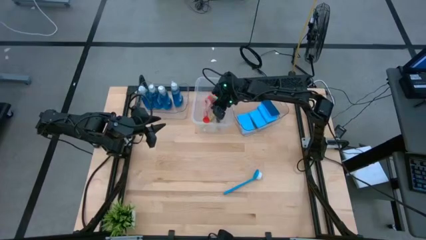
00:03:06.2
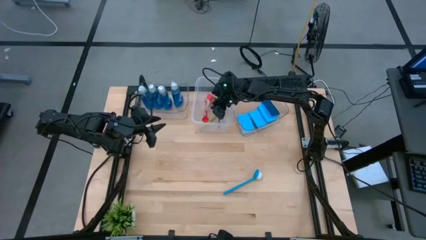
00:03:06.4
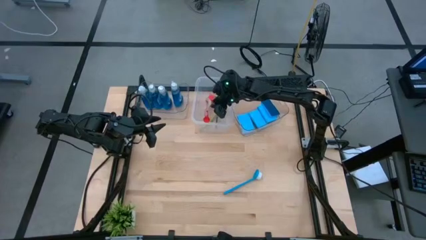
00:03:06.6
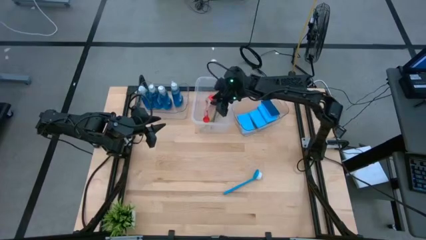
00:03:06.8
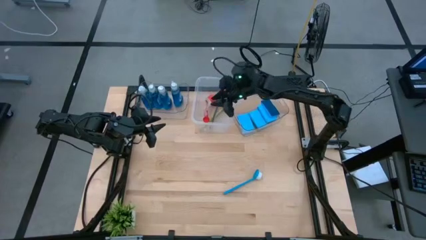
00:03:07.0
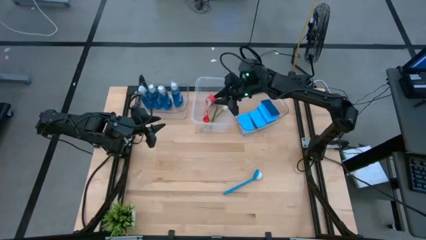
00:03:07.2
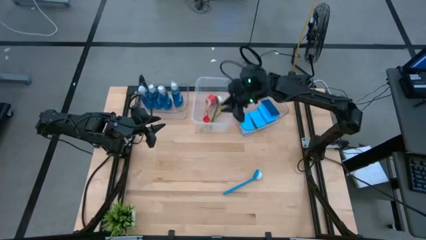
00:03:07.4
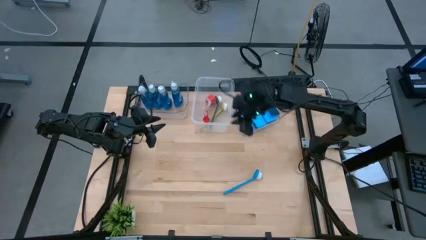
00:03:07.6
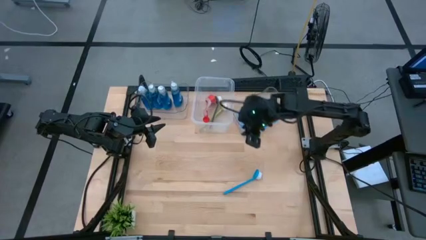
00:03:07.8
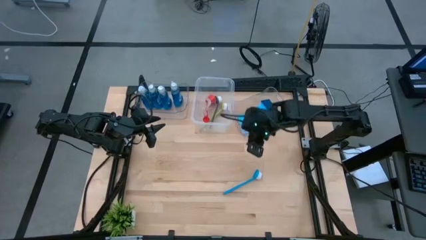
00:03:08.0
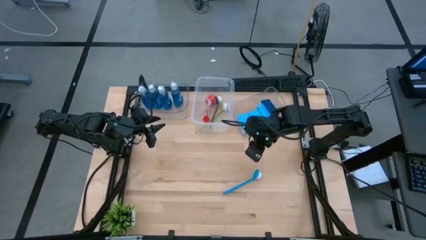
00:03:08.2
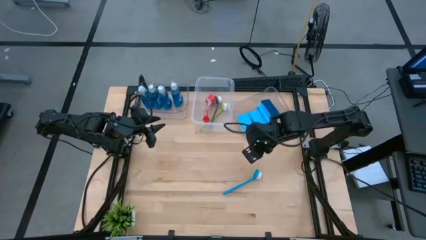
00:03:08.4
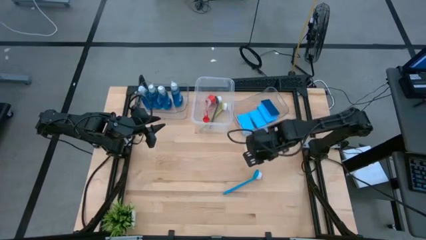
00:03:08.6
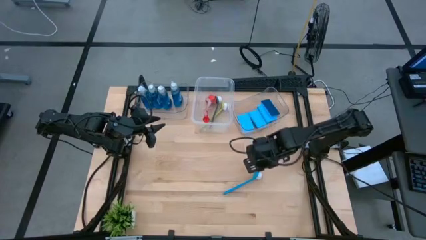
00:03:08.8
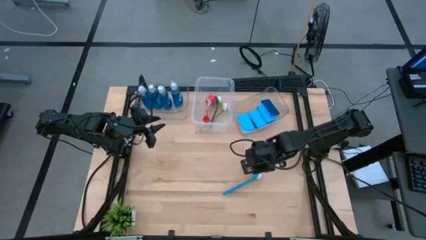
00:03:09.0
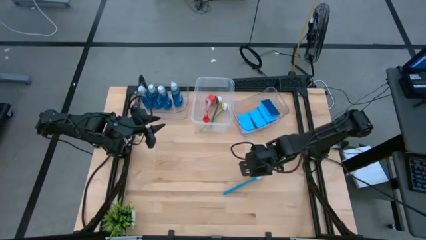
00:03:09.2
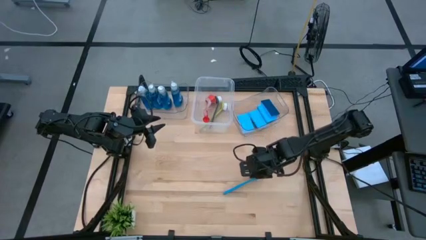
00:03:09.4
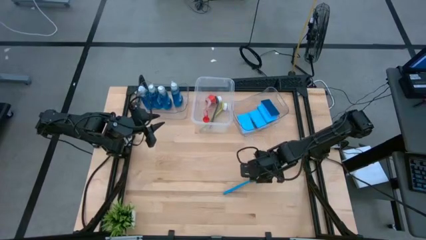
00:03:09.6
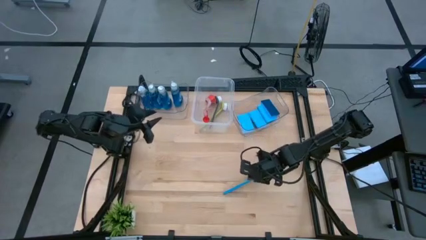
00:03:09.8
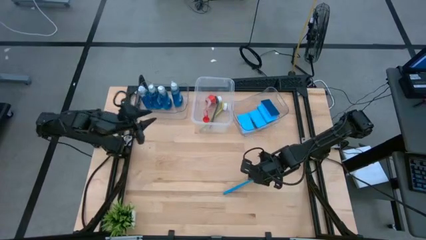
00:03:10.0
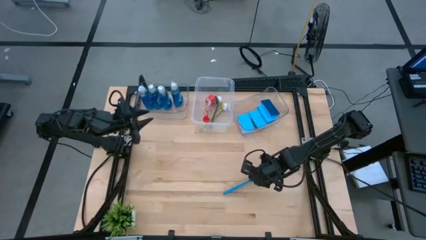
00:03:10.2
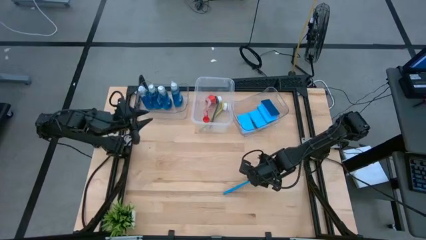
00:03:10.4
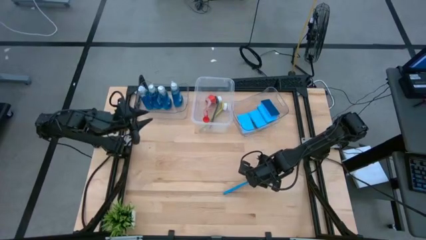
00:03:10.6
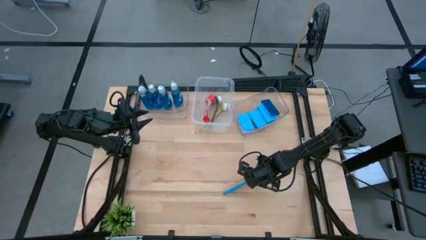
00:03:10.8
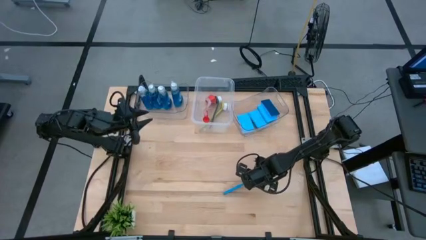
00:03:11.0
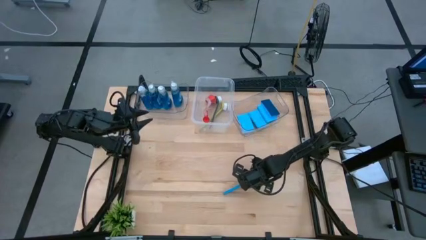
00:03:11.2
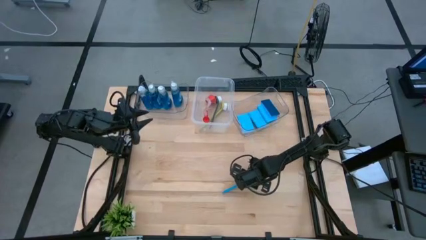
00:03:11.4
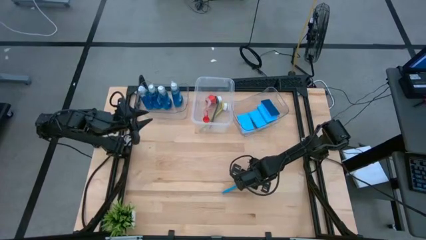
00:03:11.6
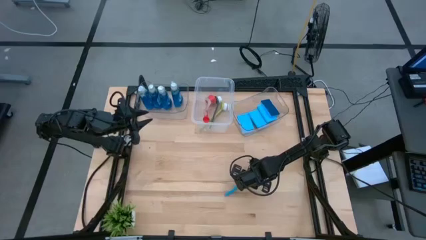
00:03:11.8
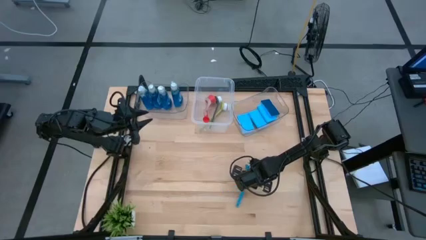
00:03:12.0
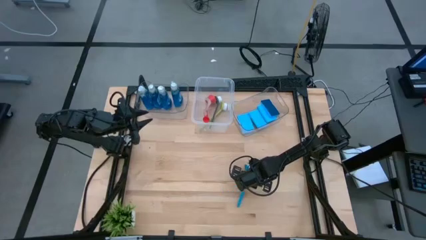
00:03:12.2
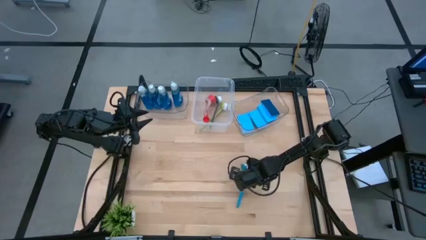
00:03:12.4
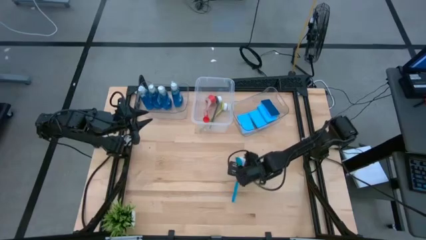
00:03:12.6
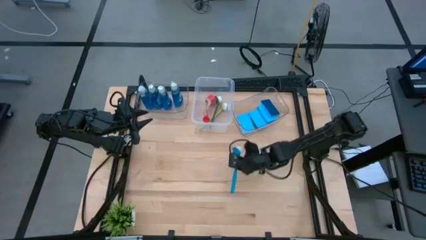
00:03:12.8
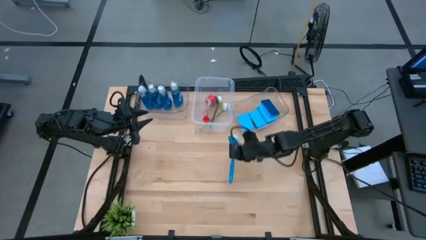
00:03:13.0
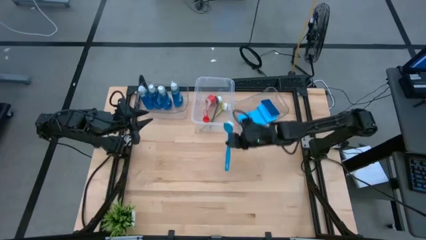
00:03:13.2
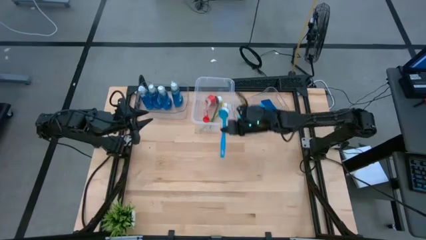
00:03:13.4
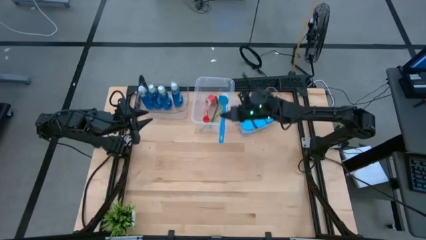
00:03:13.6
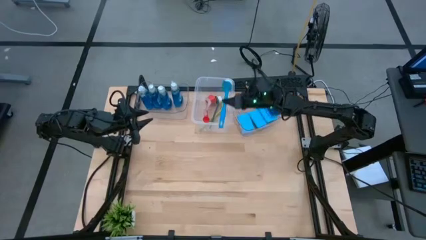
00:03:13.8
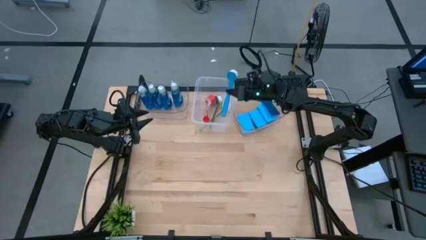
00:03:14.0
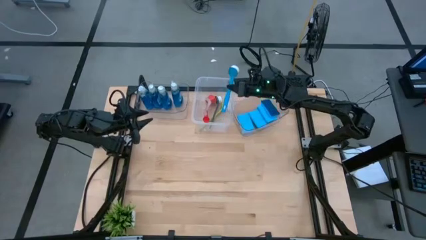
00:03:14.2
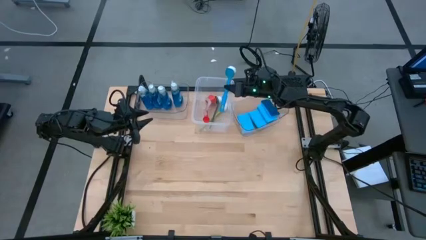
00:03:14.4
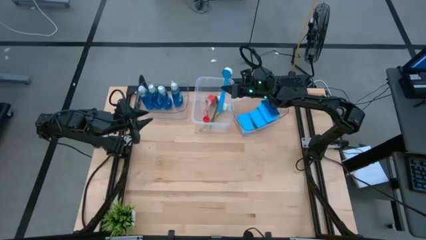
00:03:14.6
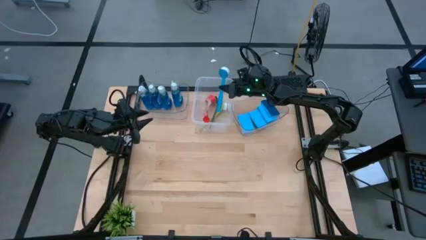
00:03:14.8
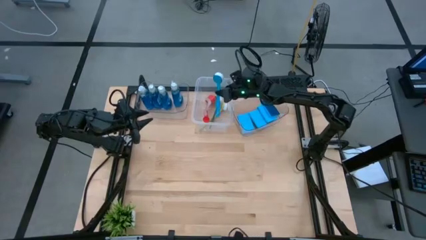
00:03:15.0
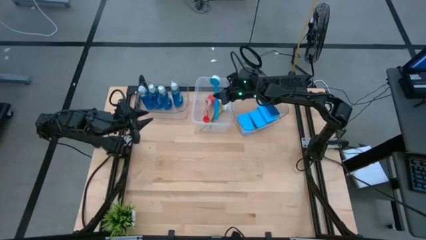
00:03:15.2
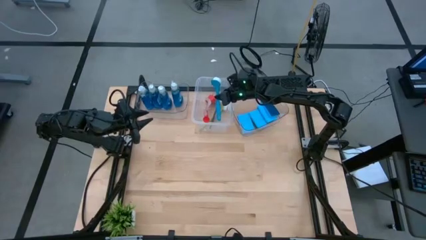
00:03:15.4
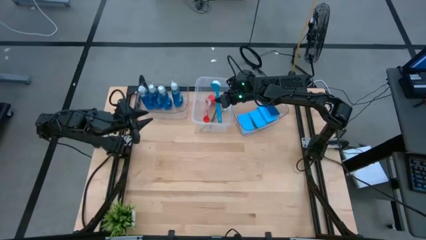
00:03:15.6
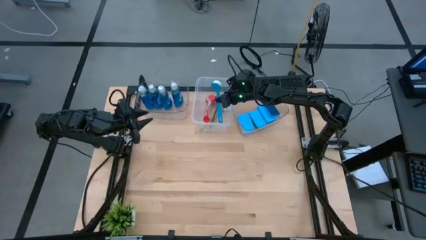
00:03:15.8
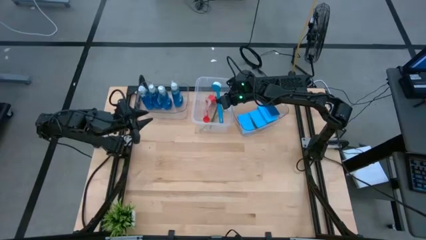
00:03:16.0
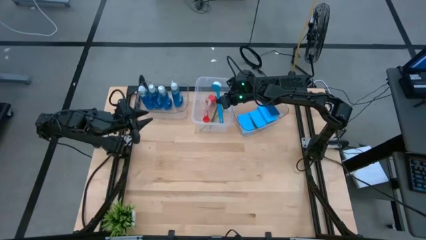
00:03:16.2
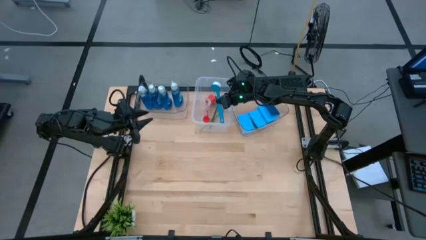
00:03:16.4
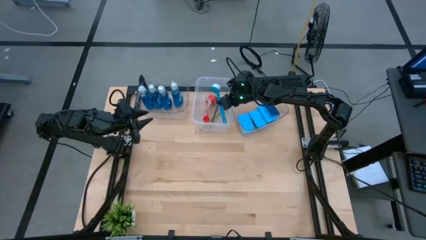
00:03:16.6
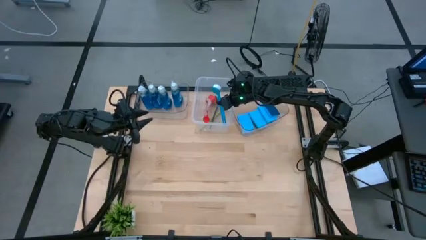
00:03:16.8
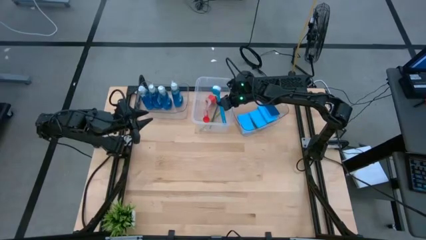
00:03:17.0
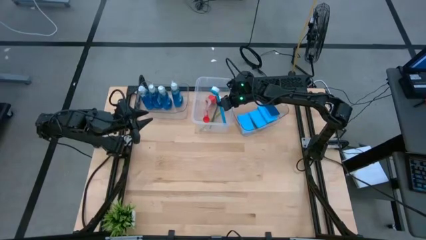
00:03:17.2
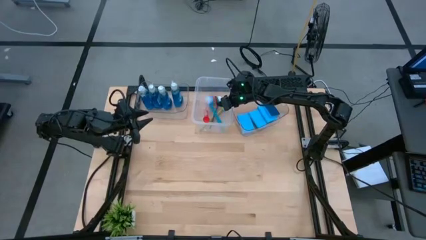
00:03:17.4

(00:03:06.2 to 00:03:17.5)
Task: Pick & Place Kitchen Sink Supplies
Put the grey dish brush into the large transparent bin

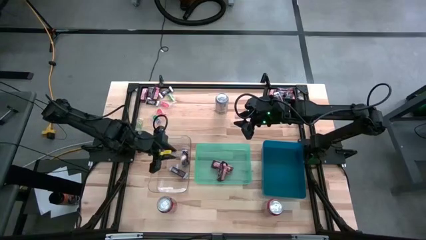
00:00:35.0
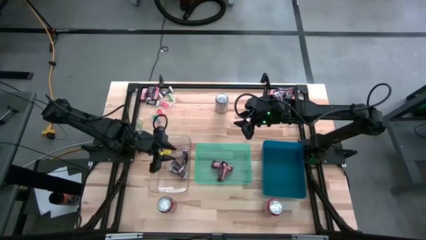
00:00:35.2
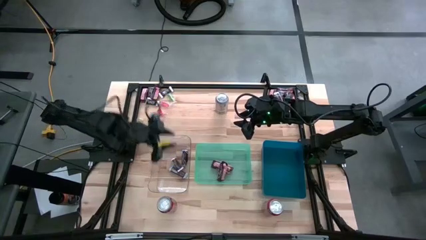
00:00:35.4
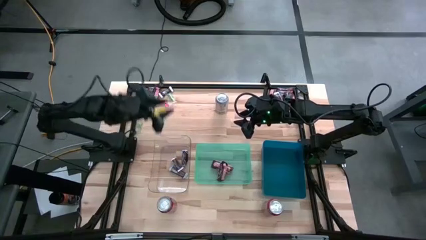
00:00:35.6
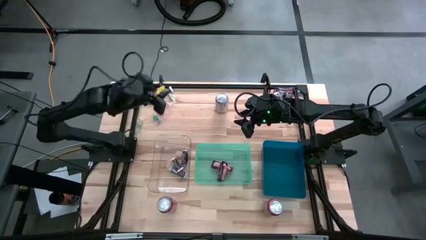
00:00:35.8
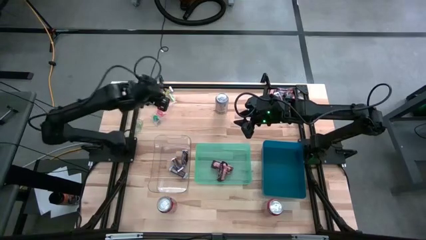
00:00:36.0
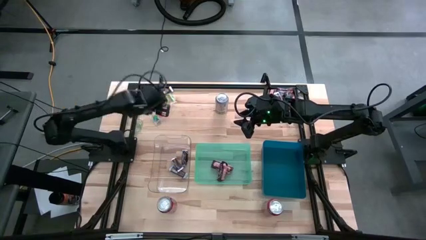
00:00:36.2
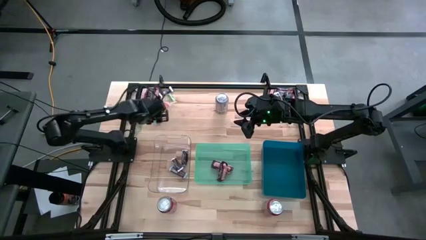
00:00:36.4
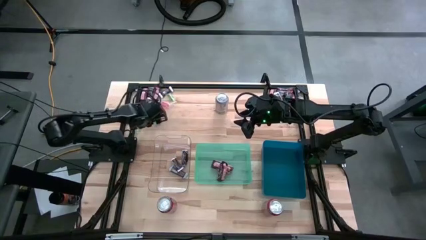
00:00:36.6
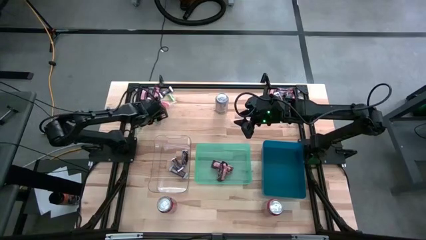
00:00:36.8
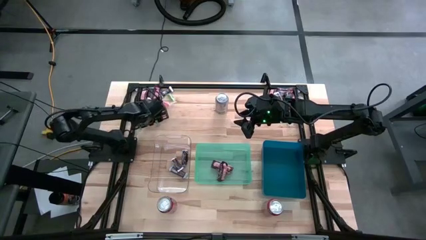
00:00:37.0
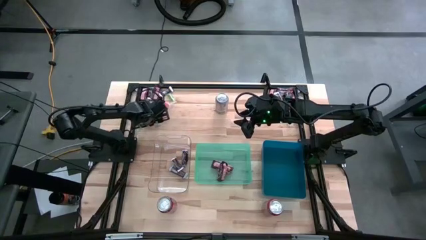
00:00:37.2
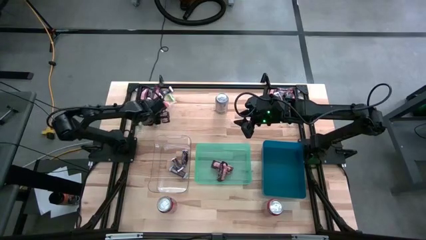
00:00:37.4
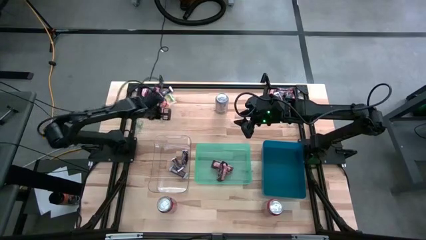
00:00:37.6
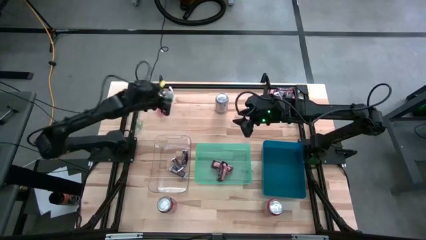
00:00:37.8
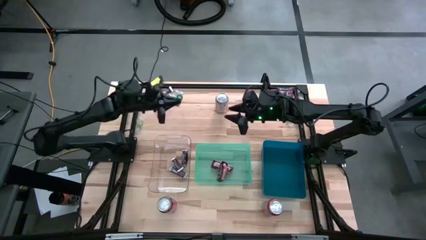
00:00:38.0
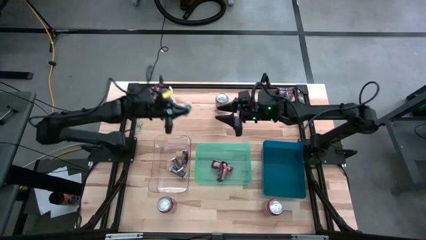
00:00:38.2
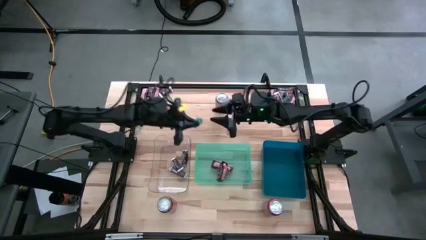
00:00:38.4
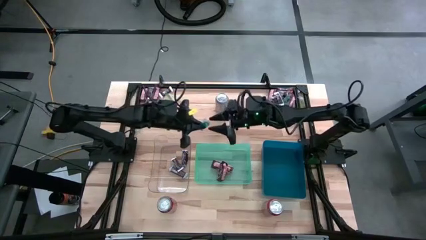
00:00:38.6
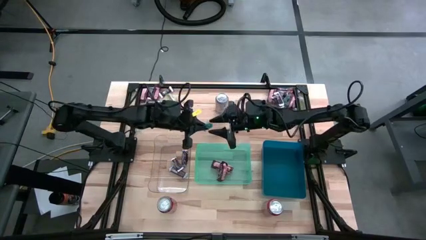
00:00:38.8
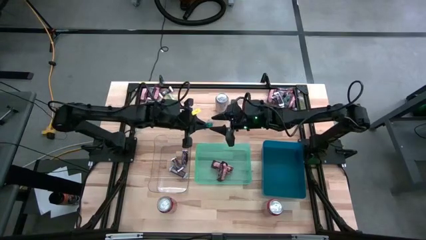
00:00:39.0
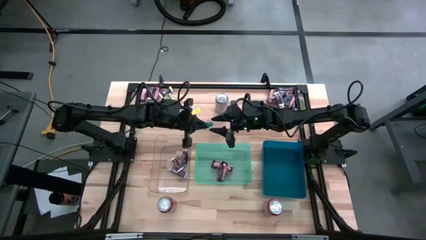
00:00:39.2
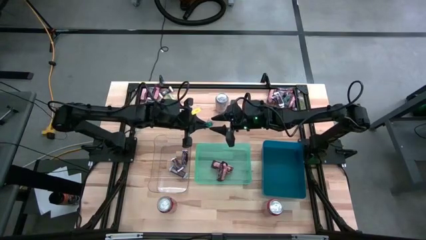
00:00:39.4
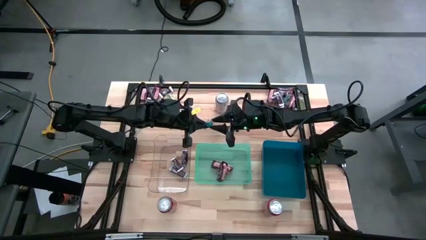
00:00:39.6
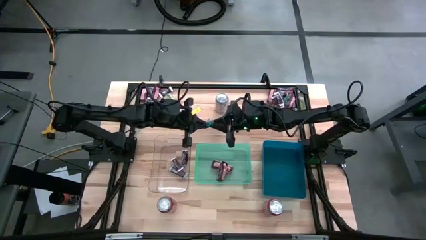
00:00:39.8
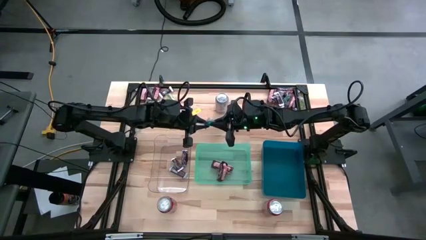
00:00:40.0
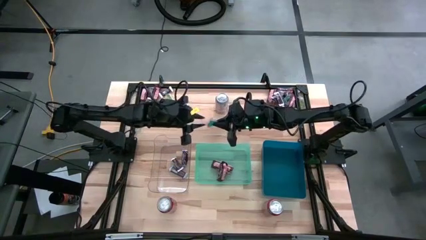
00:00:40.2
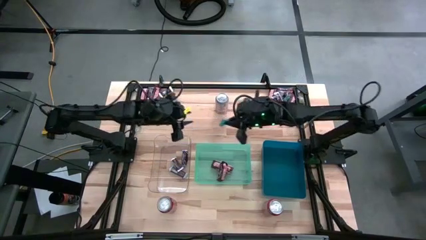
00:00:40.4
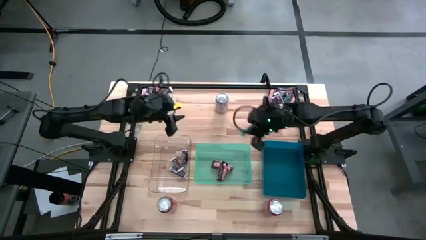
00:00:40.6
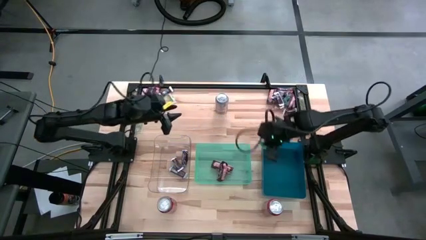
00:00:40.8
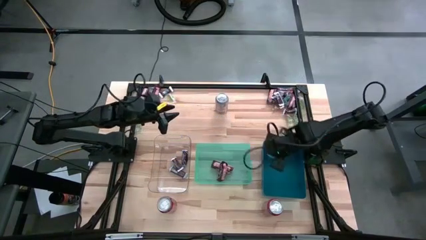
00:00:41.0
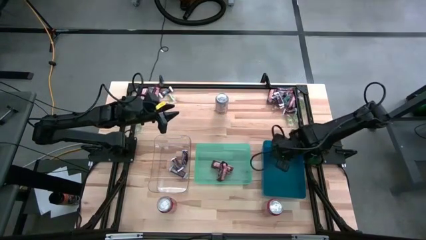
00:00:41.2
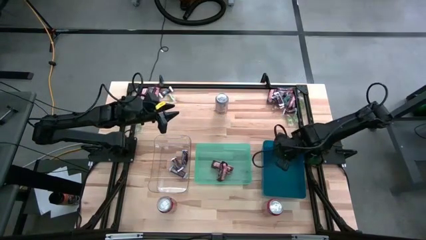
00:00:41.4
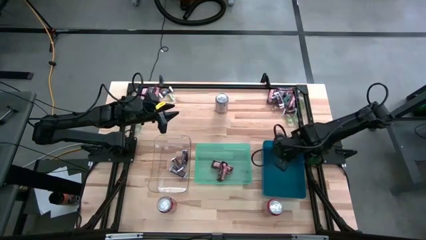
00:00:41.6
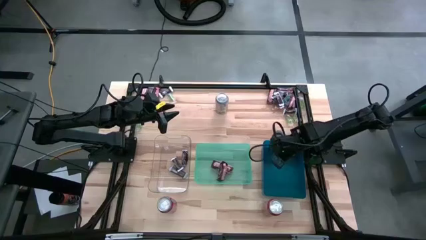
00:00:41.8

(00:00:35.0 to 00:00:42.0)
Task: Organize candy in baskets
Put the blue gummy into the blue bin
